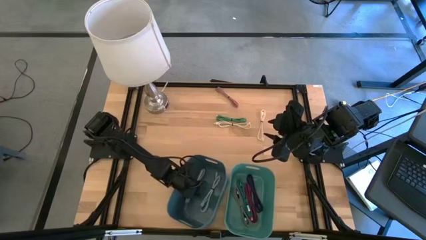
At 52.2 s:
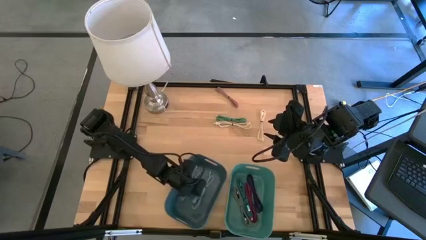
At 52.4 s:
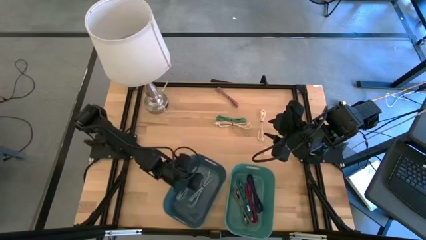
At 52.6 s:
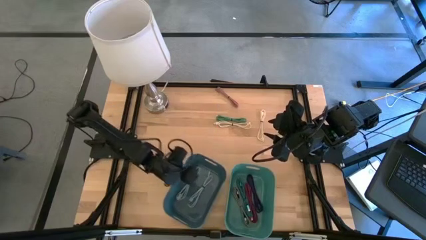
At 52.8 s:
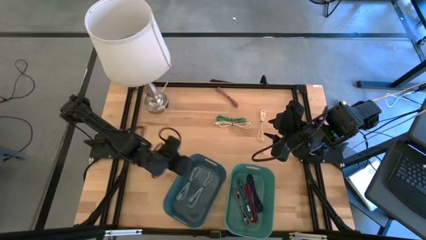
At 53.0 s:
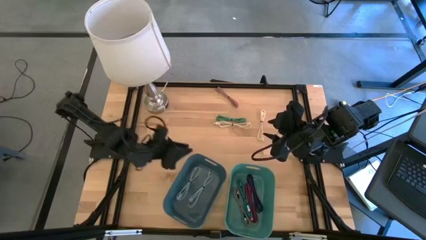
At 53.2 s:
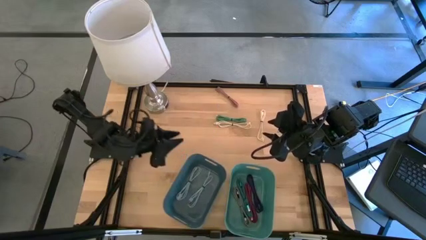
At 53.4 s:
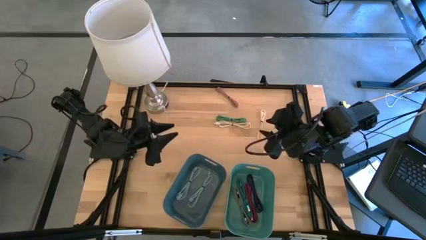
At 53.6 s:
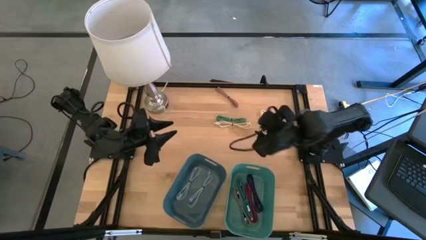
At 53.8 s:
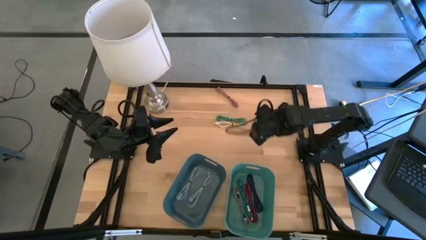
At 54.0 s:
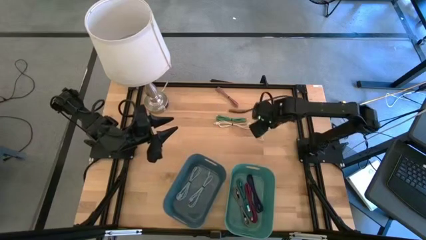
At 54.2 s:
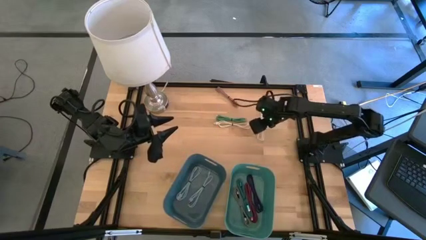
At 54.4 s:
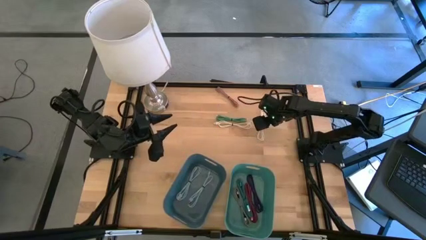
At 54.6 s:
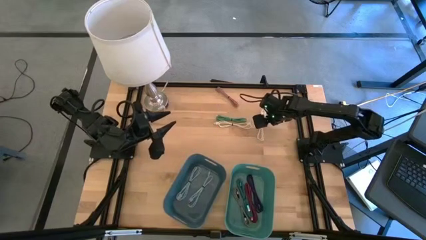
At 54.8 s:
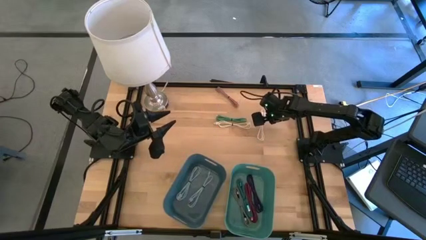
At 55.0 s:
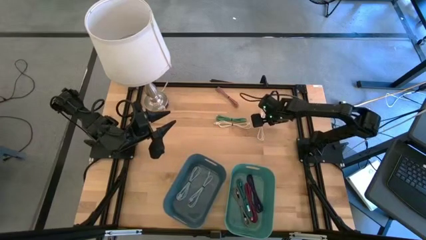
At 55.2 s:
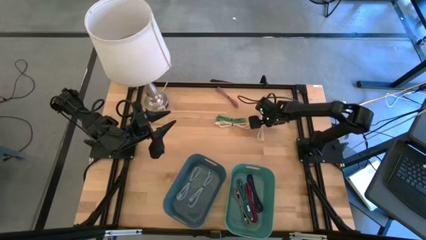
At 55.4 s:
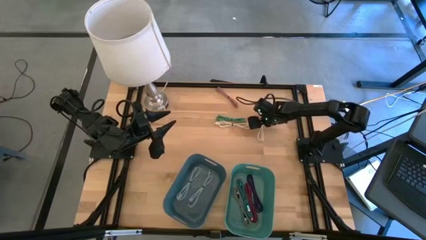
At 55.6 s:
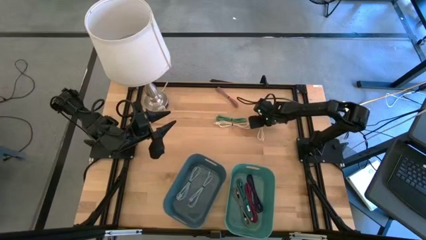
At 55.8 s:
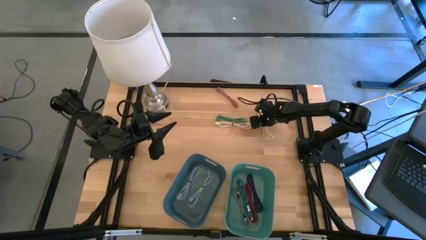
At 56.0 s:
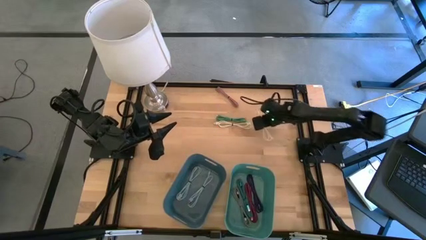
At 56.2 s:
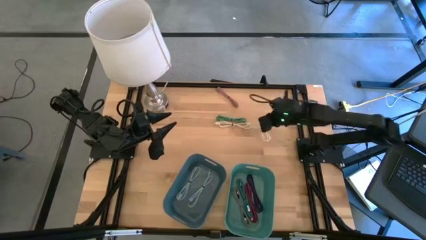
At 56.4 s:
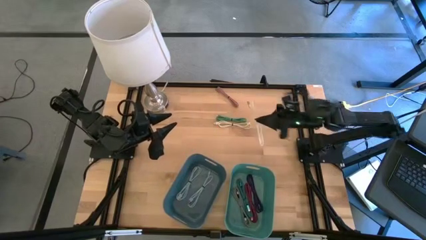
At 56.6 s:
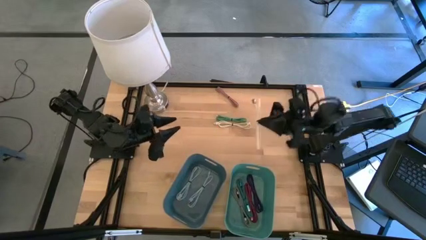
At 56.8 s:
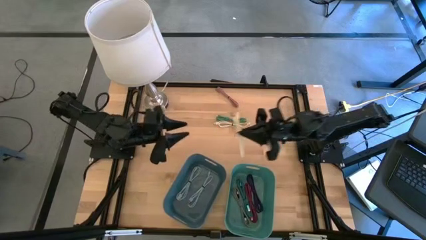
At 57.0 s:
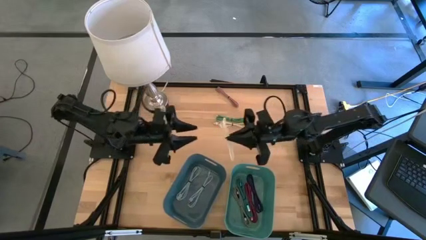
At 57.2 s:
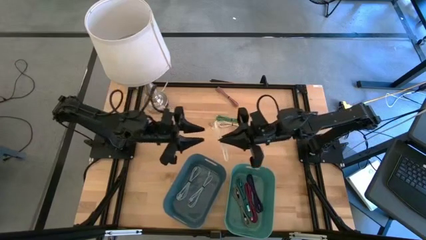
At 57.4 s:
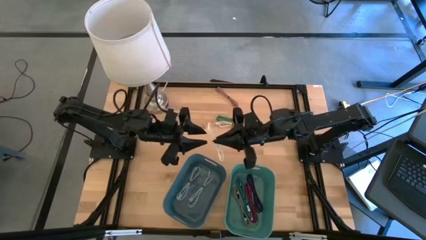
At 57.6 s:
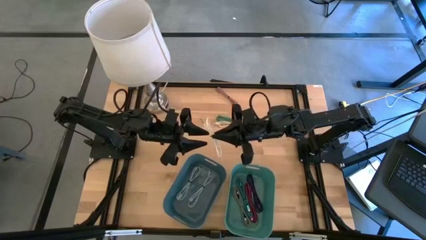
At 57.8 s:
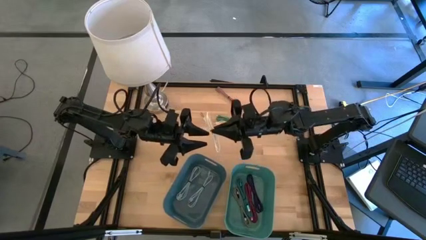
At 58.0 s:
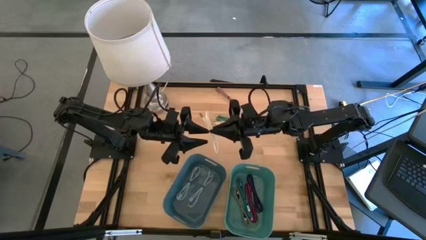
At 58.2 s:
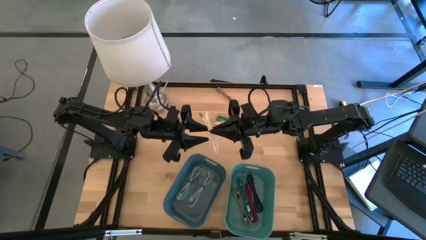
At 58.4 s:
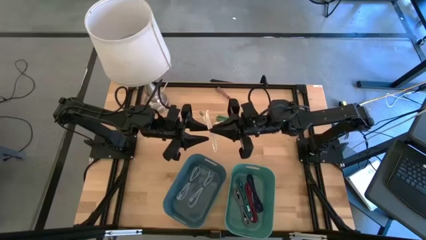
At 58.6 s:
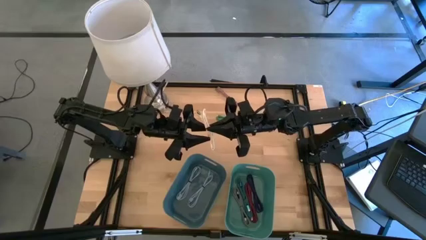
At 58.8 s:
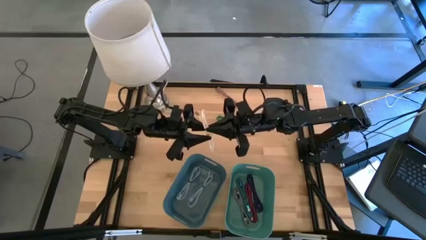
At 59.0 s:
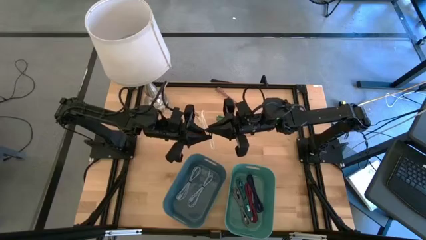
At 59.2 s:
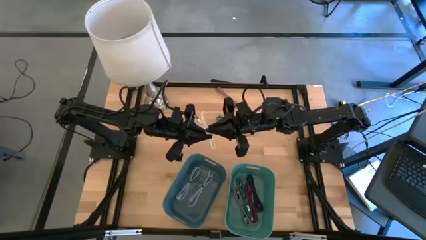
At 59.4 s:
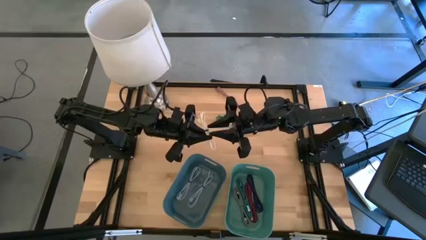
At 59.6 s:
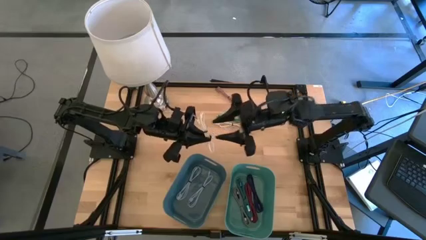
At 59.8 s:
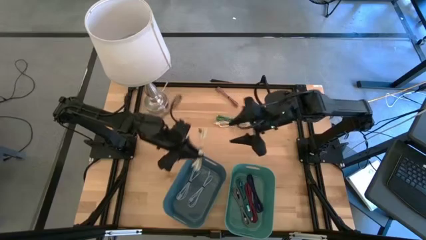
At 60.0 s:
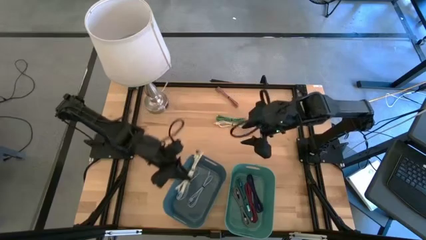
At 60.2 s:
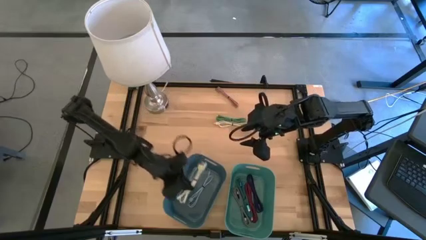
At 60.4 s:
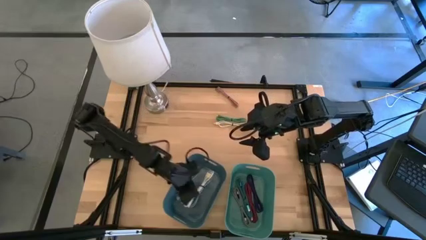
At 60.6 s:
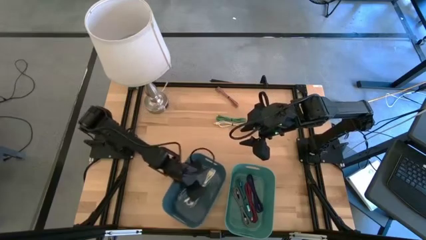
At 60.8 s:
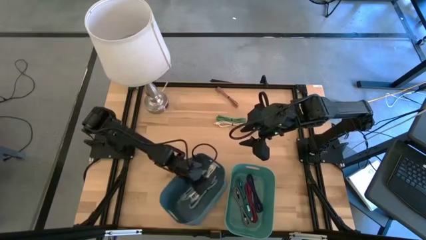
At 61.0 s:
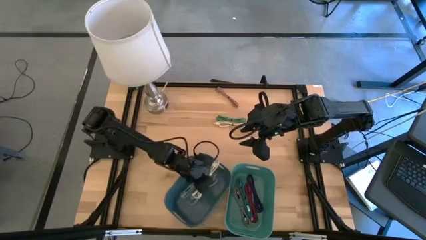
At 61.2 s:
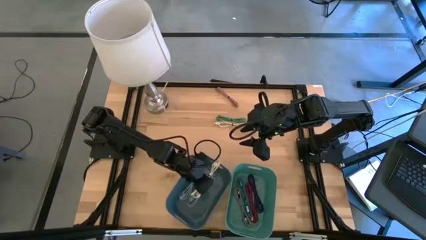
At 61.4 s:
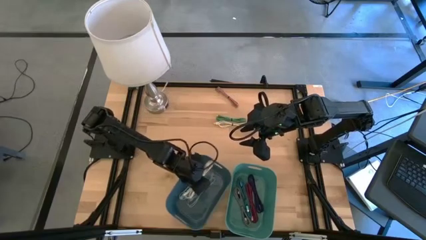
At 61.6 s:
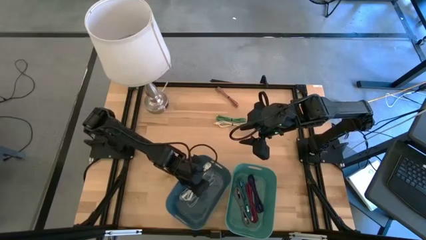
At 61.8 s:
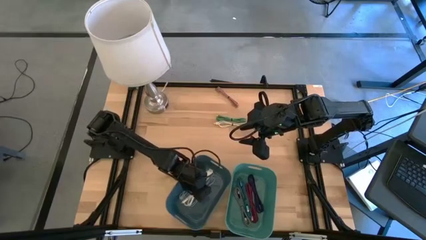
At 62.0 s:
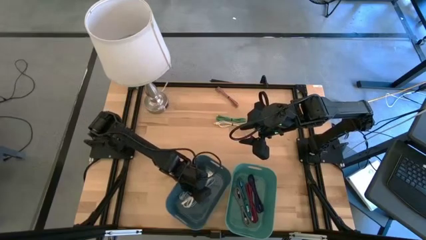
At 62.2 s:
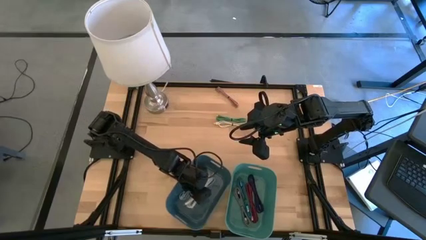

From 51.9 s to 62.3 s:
Put the right white charger cable into the blue container

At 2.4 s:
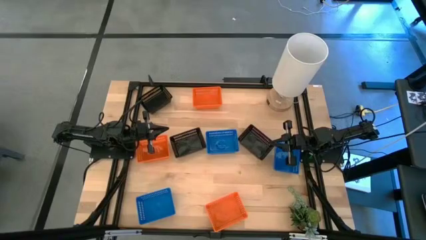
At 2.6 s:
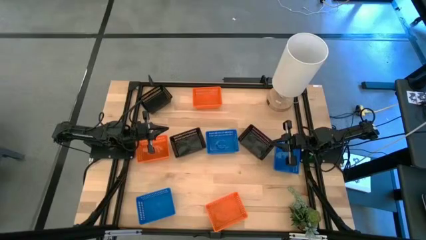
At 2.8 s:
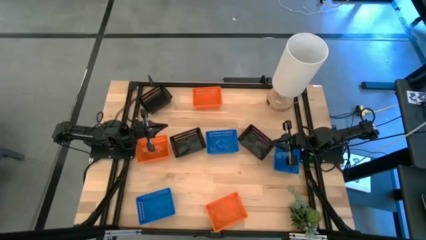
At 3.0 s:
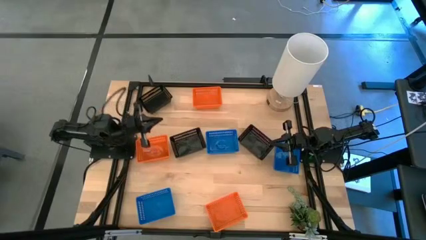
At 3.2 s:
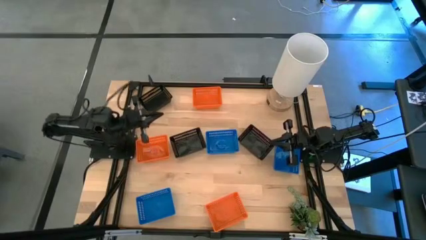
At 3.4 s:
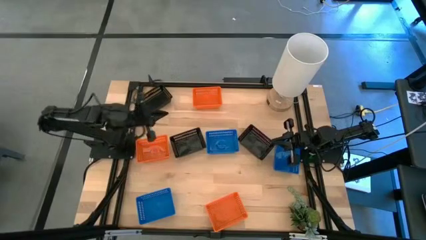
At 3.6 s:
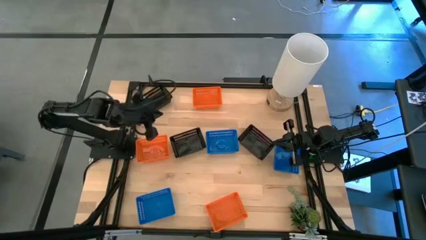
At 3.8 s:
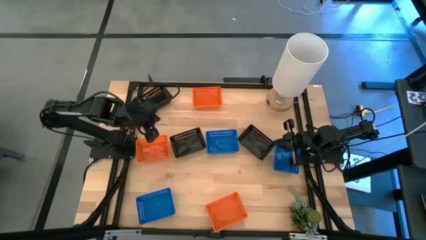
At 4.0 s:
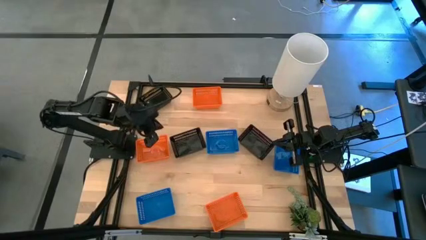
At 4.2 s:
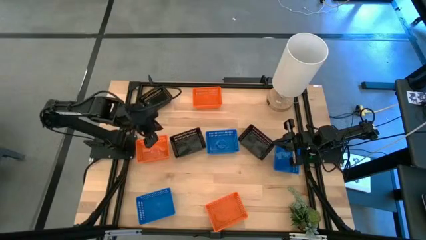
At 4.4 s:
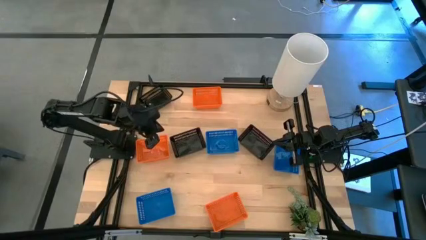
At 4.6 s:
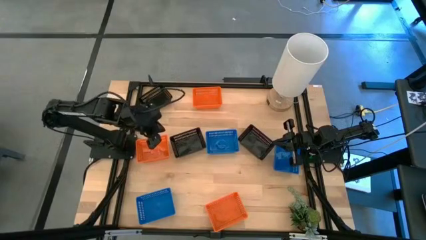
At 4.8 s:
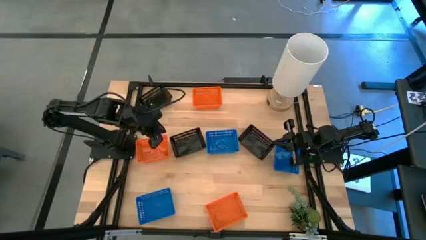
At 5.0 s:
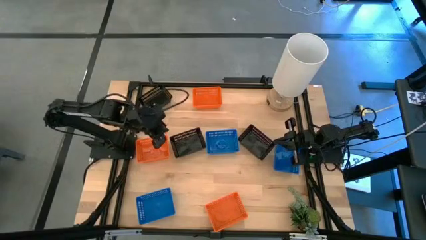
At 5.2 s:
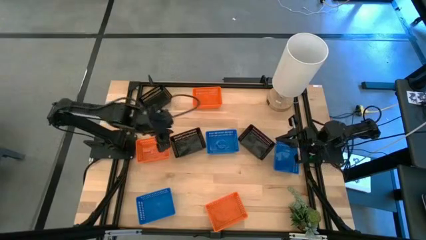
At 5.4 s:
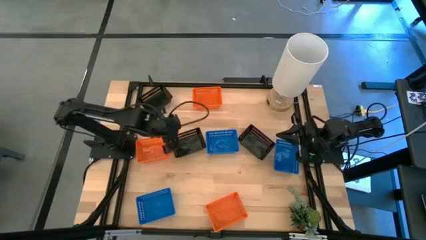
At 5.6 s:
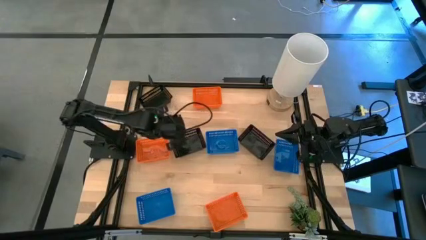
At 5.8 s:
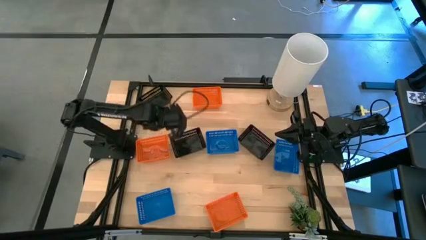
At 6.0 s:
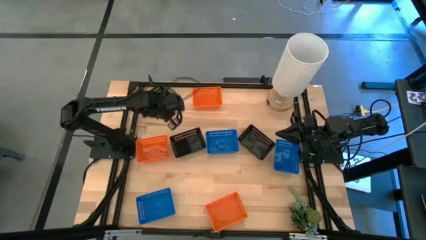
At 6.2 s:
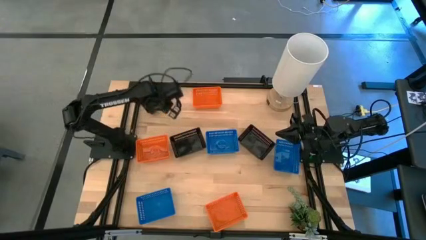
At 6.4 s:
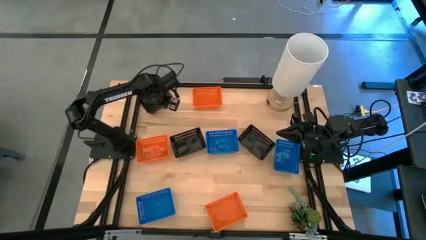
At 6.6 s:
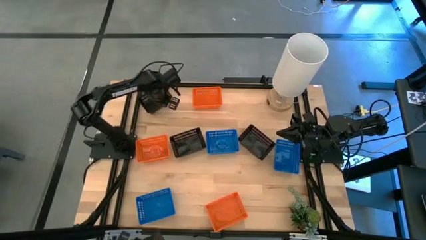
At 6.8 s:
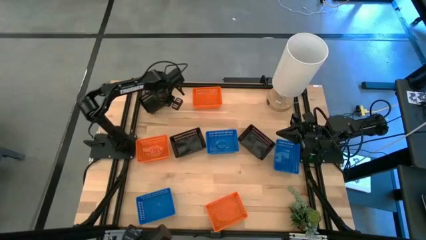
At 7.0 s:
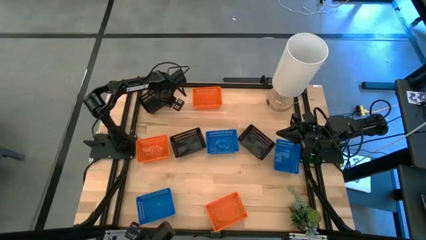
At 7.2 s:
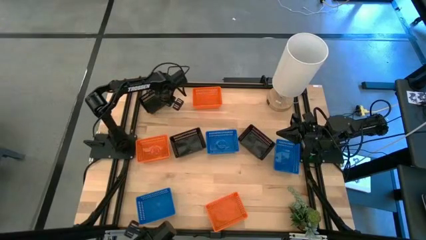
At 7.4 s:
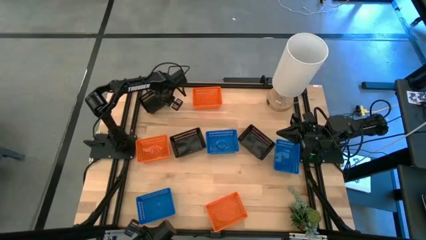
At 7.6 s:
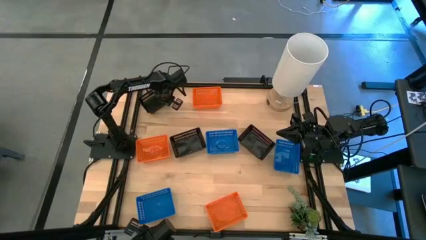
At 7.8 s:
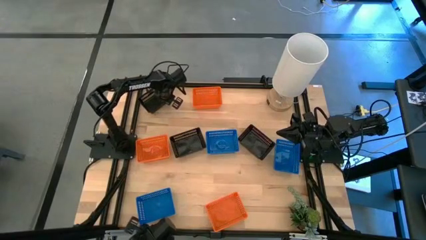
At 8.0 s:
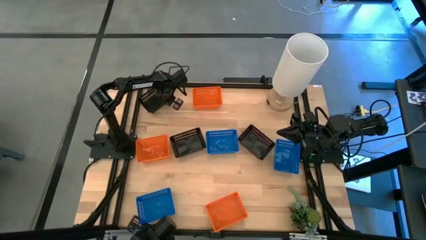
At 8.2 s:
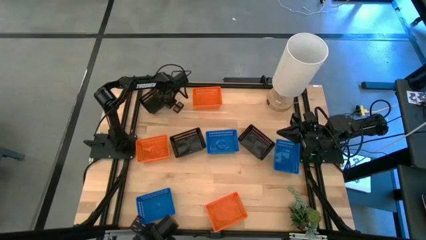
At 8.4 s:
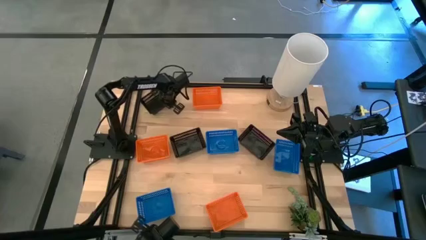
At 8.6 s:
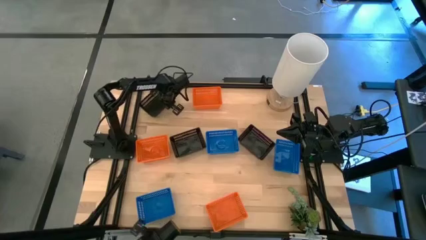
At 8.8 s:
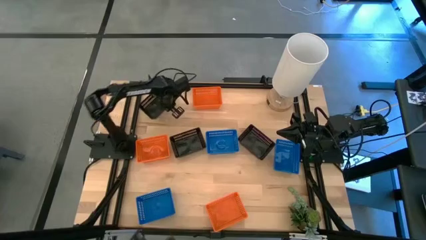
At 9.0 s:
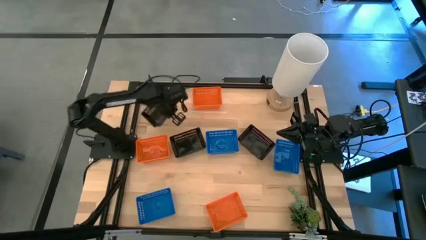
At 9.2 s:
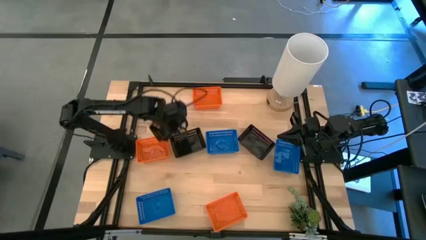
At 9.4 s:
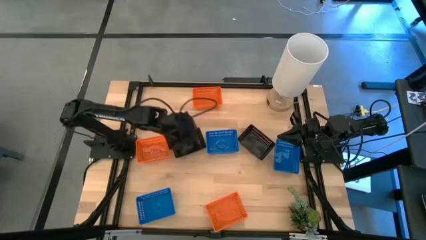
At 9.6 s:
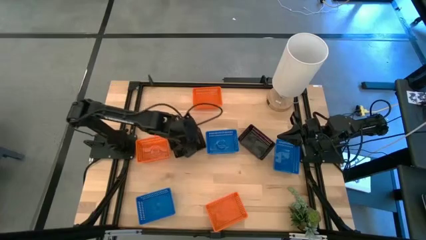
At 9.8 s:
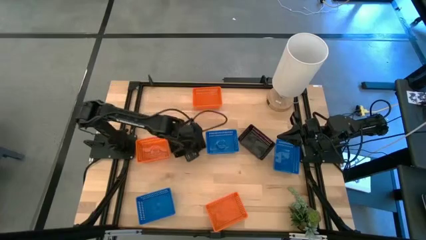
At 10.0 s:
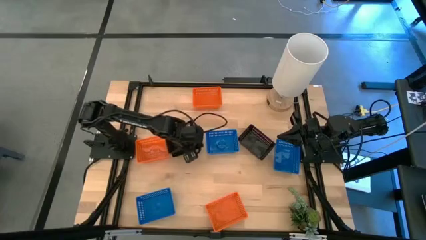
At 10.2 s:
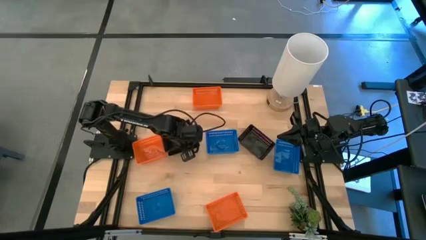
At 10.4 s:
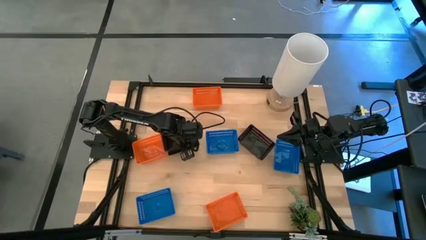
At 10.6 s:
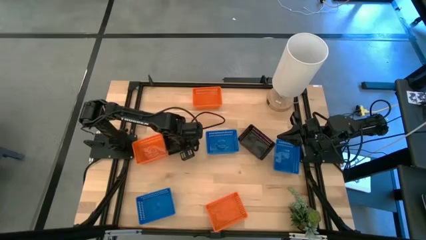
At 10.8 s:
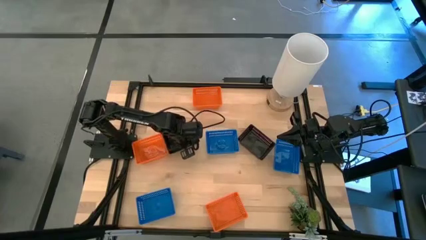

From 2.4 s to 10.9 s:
Stack the top black bin on top of the bottom left black bin
